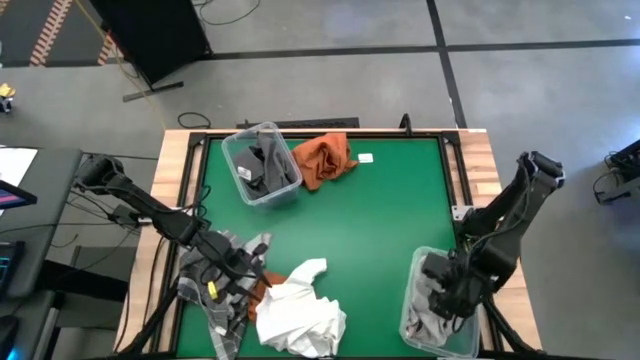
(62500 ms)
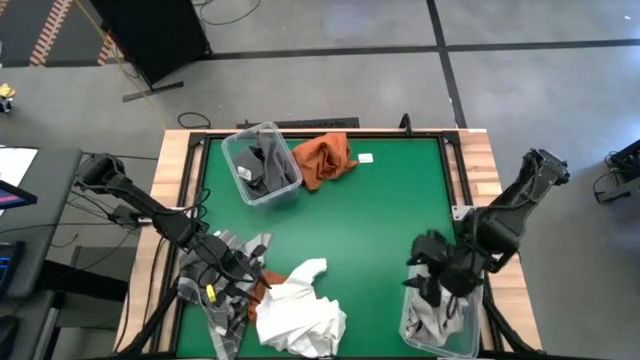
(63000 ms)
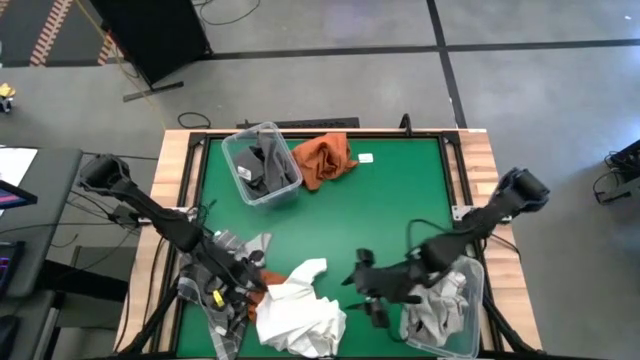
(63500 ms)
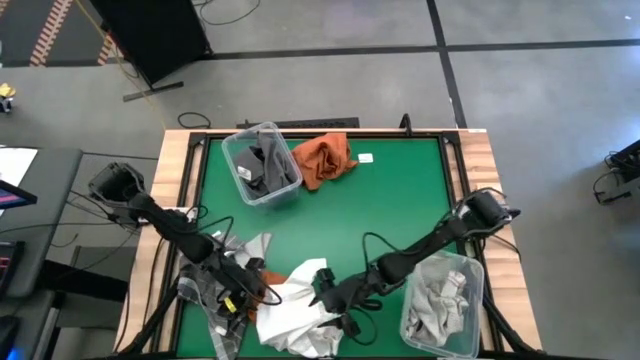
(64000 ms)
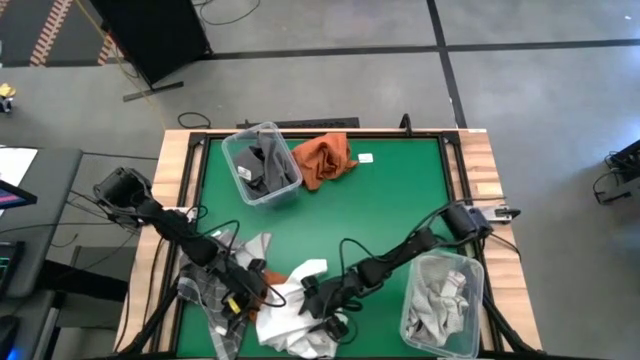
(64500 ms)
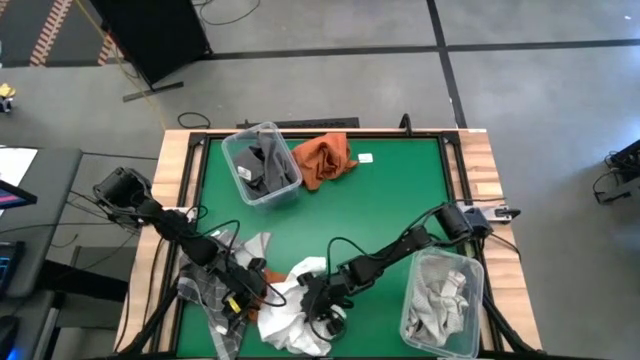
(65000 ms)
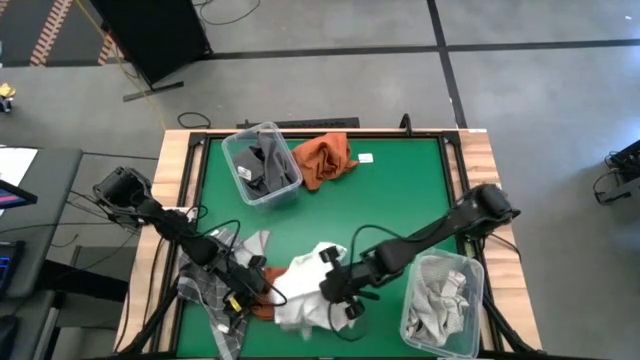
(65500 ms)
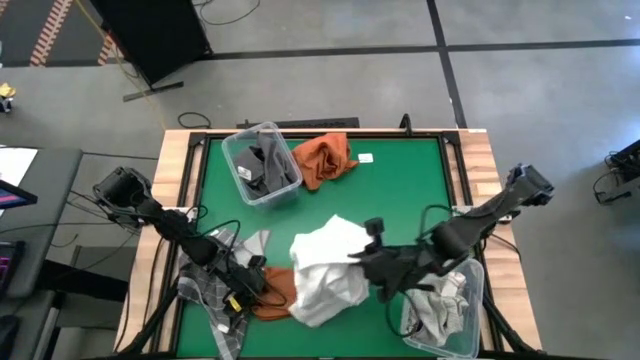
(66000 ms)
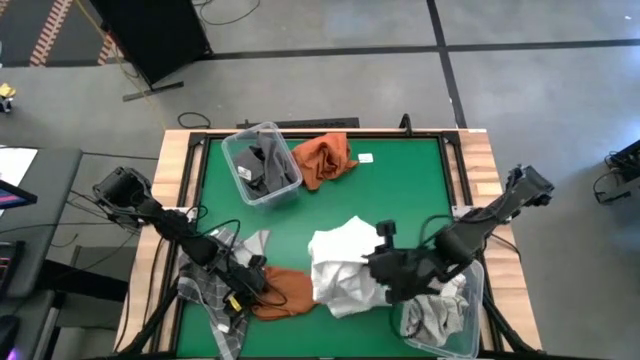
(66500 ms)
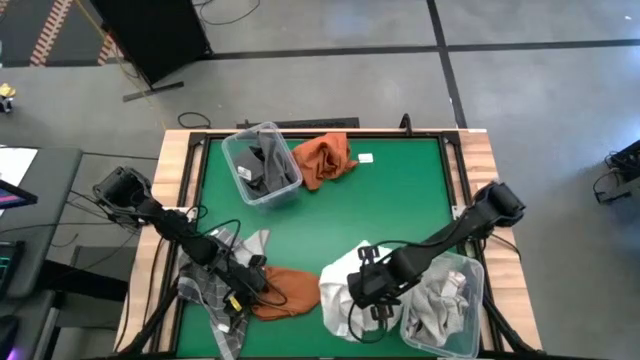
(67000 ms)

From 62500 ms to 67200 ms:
Task: Sort towels by color in basket
Put the white towel into the bottom transparent bin

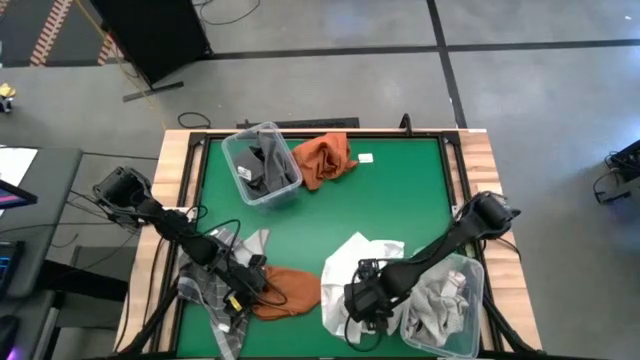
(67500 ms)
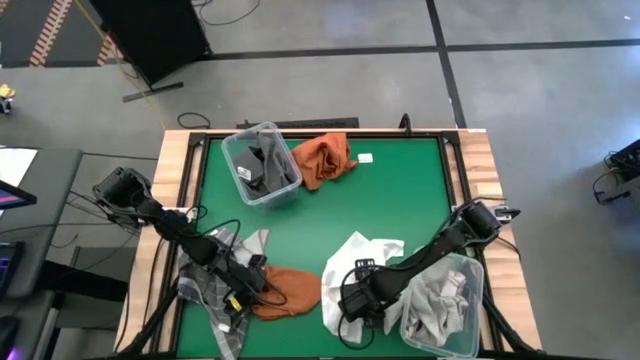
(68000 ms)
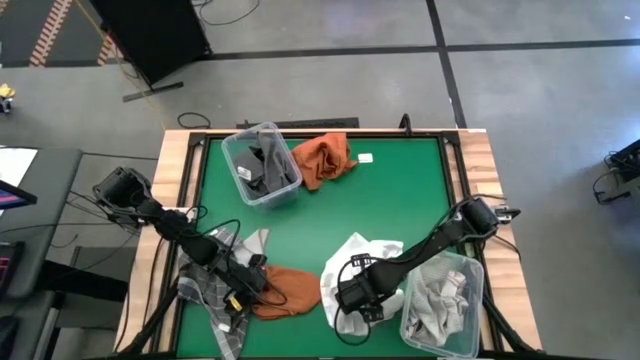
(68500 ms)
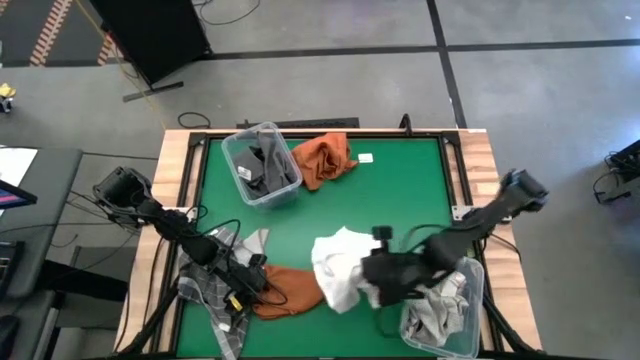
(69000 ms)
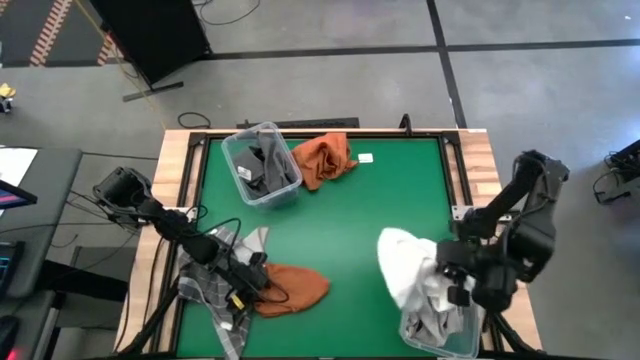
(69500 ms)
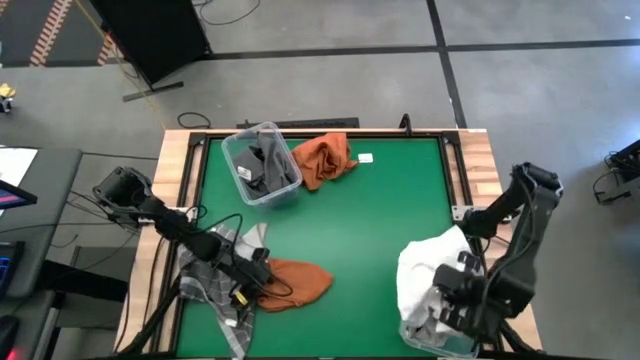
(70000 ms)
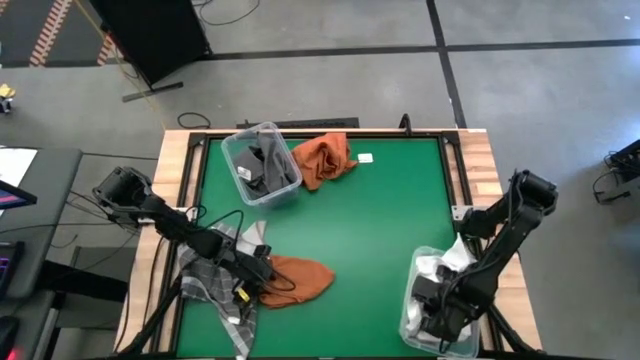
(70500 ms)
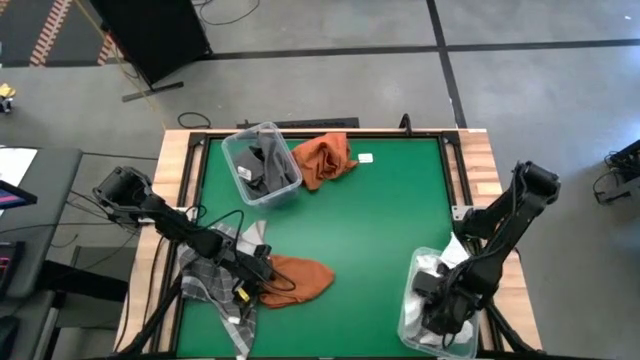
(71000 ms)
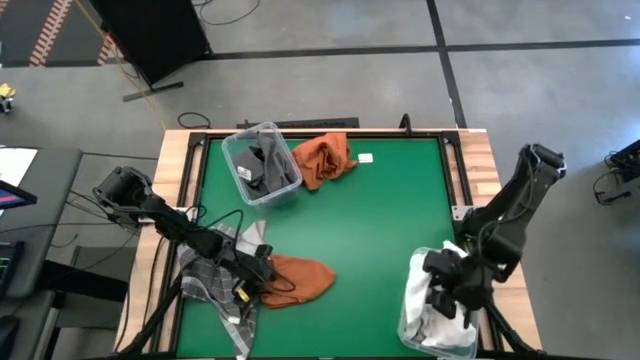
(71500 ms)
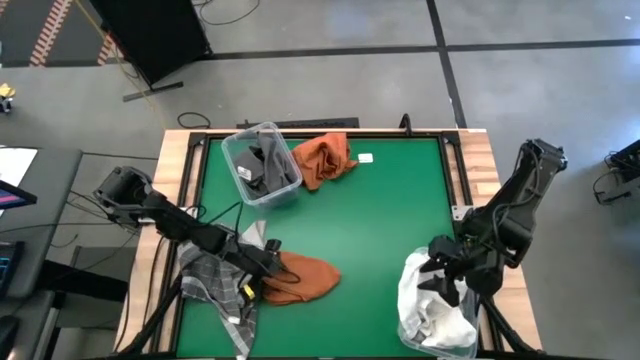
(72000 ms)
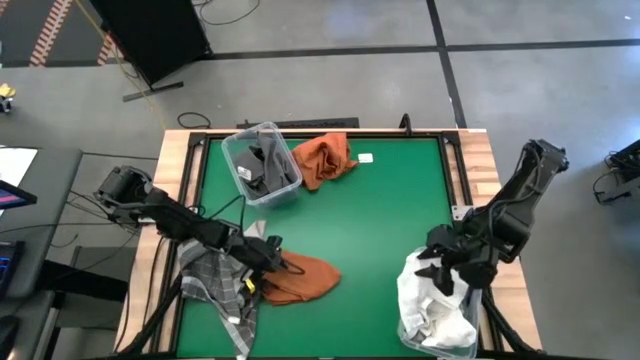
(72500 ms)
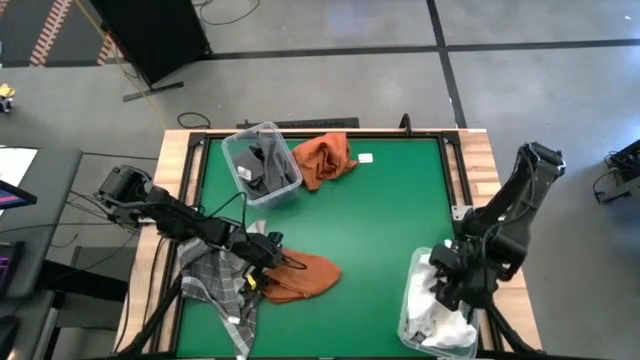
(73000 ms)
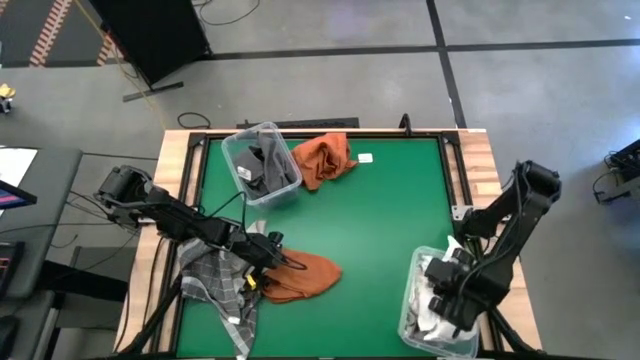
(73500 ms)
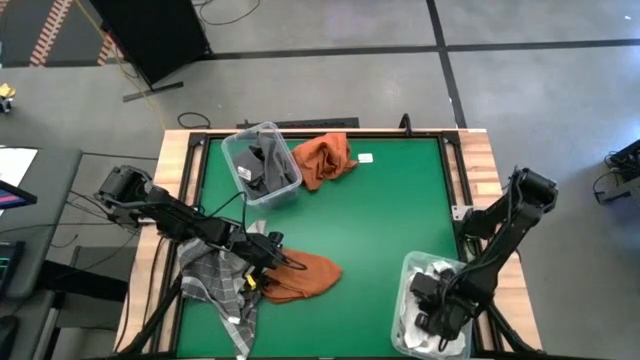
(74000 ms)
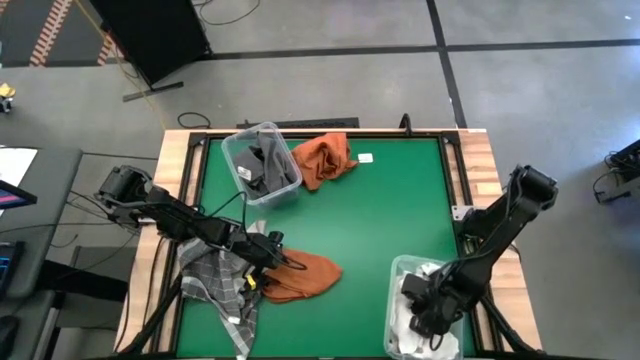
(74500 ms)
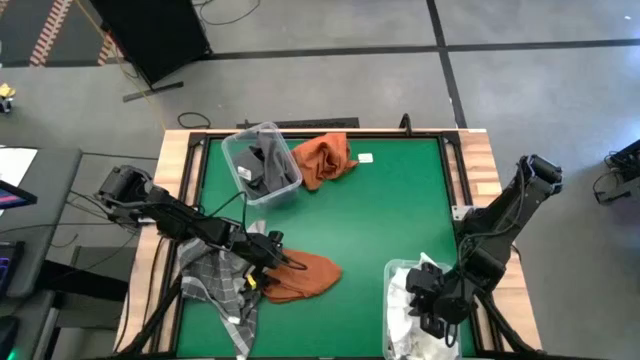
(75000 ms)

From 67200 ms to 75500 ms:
Put the white towel into the bottom transparent bin

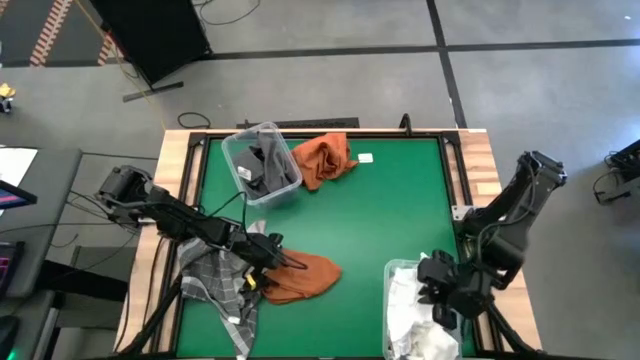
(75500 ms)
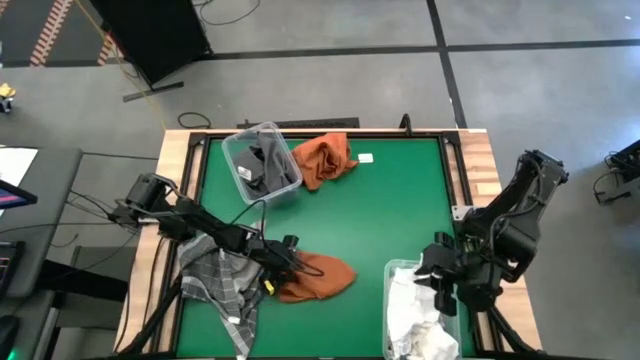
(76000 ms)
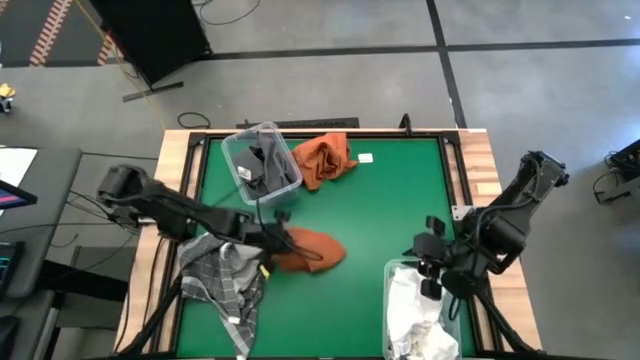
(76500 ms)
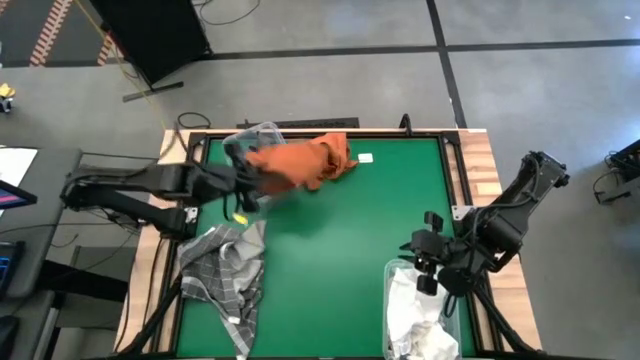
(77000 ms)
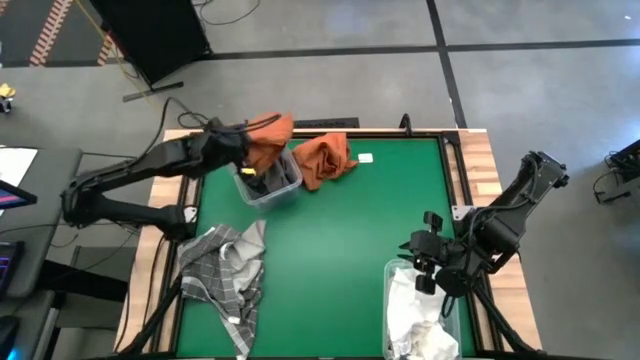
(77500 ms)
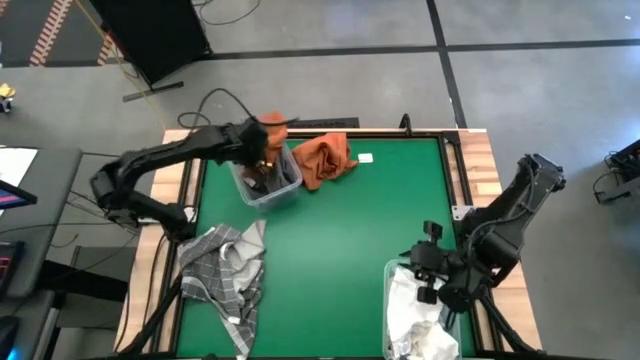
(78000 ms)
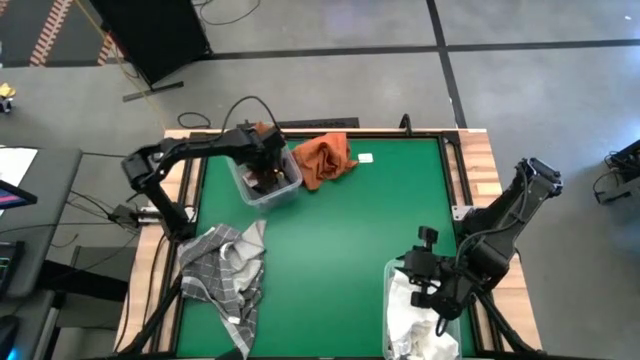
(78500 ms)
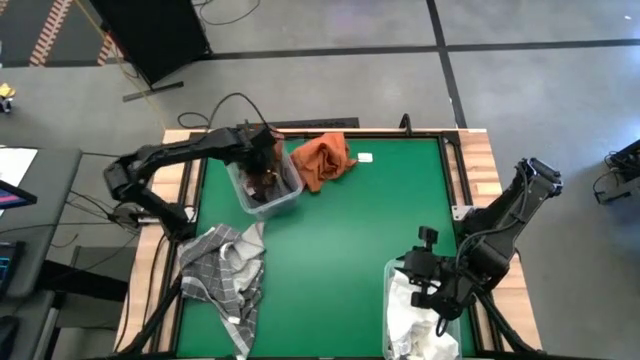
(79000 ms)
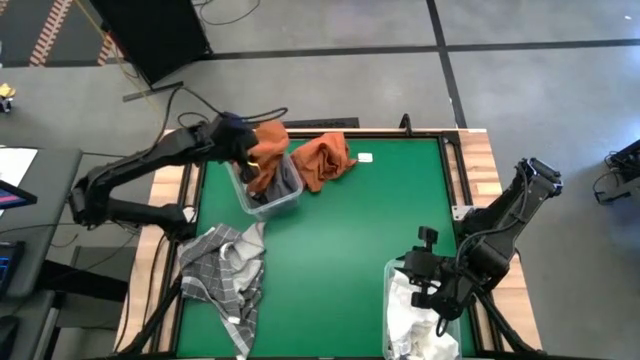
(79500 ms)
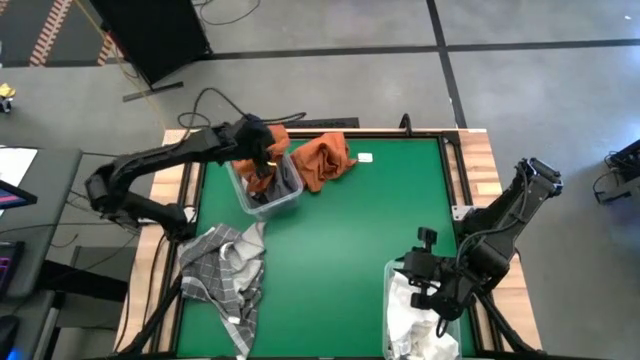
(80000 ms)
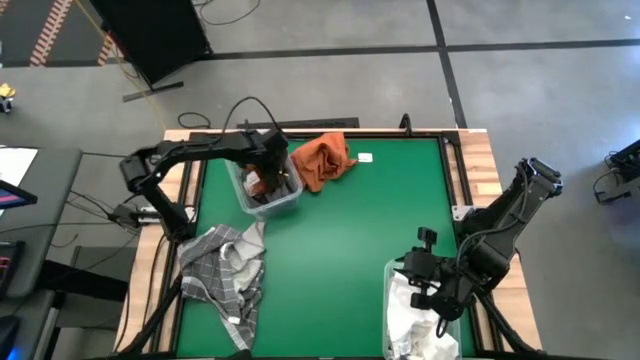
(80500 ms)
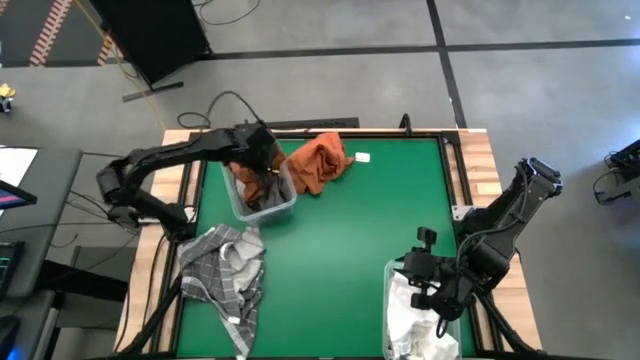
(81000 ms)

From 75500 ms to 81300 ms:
Put the orange towel into the top transparent bin

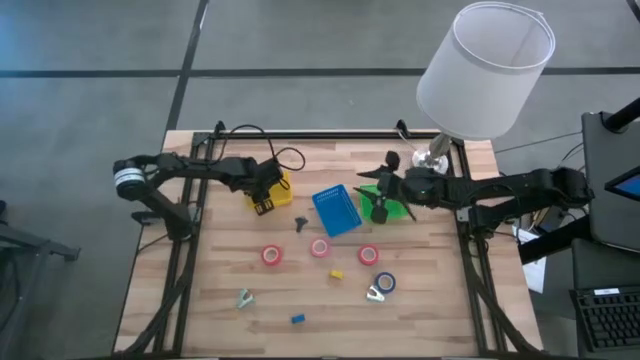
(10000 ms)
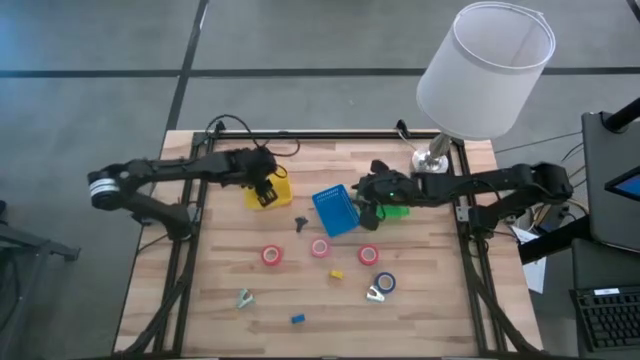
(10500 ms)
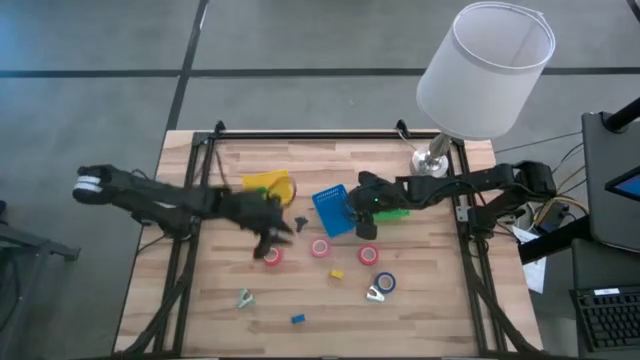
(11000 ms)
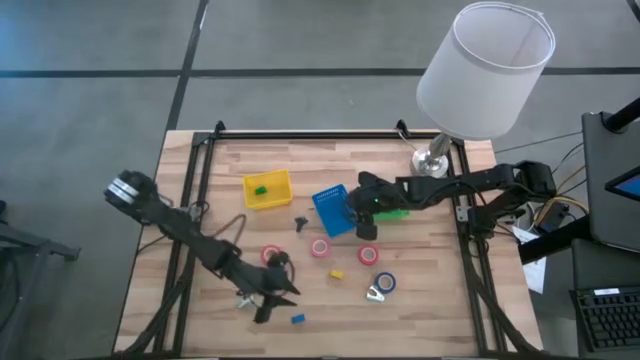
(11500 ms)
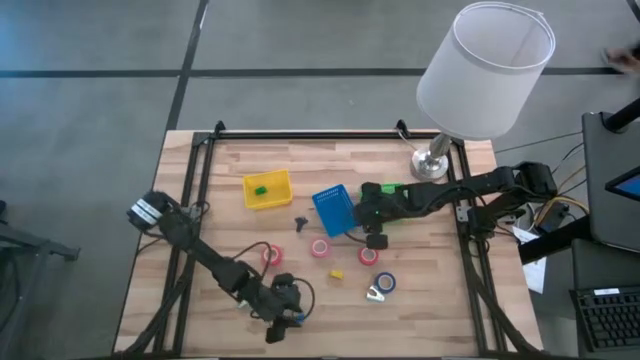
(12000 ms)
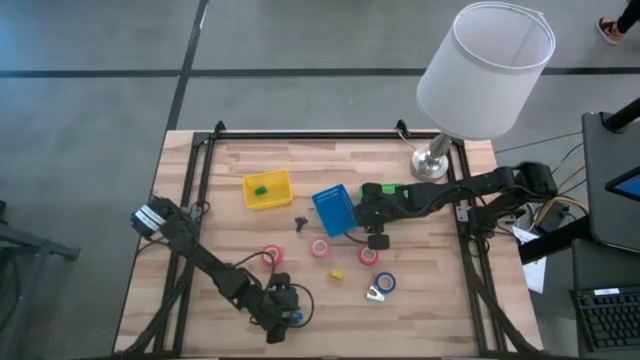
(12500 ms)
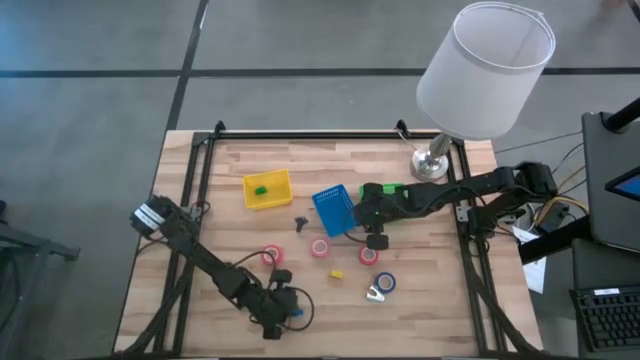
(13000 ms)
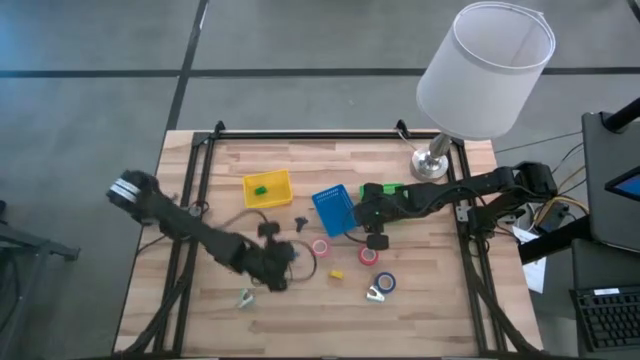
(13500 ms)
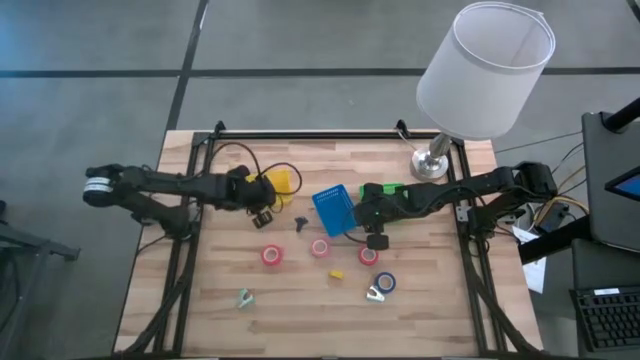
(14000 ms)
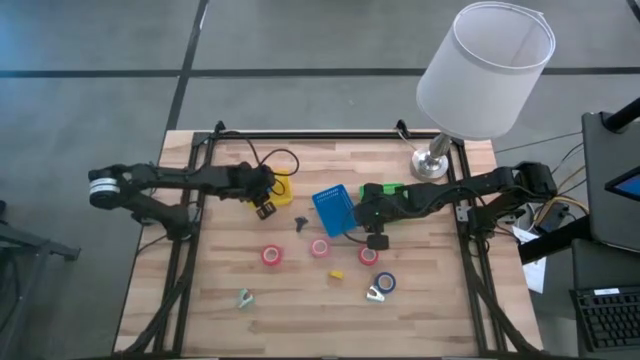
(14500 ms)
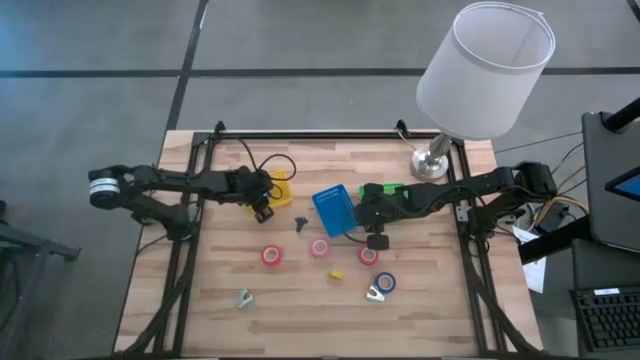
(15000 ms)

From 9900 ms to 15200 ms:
Task: Pick and place Stapler, Stapler remover, tape
Put the blue stapler into the yellow basket
